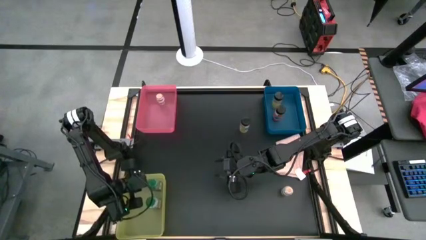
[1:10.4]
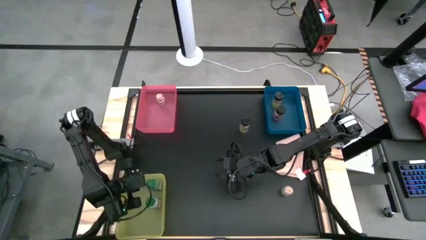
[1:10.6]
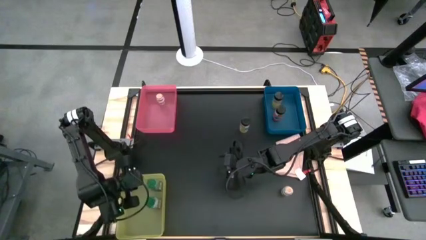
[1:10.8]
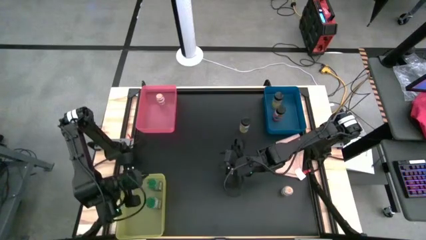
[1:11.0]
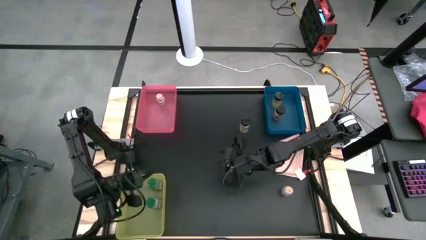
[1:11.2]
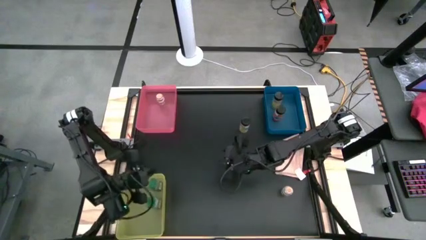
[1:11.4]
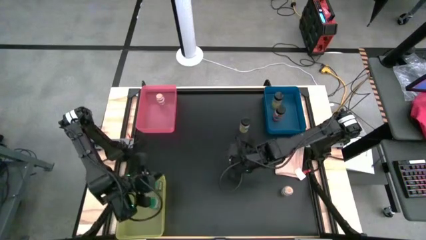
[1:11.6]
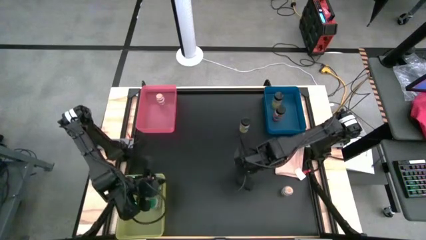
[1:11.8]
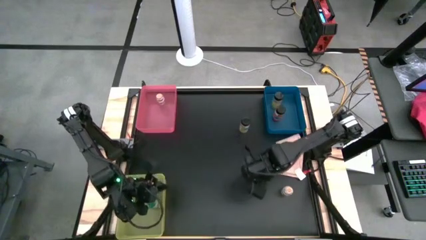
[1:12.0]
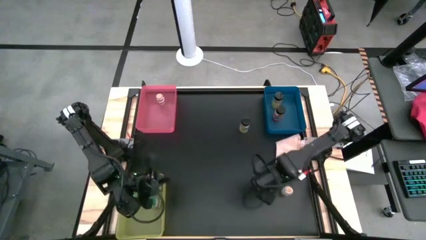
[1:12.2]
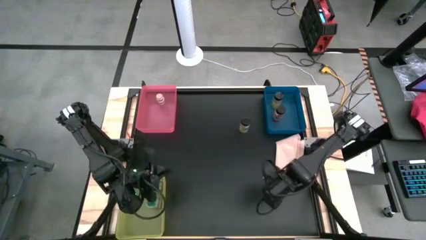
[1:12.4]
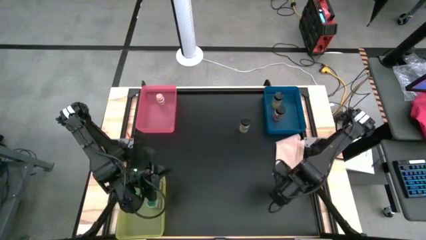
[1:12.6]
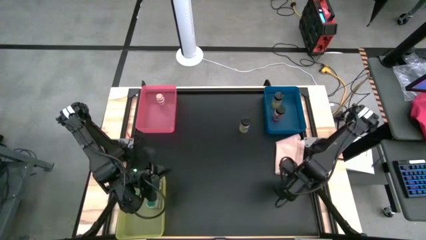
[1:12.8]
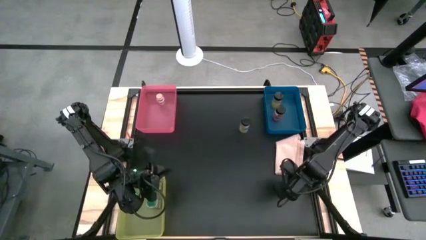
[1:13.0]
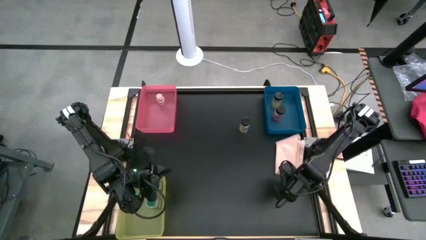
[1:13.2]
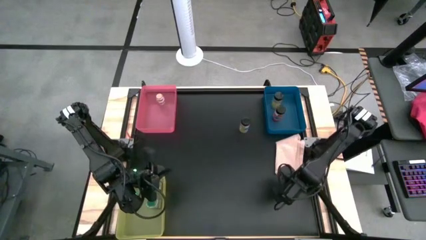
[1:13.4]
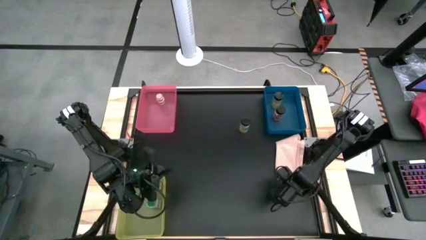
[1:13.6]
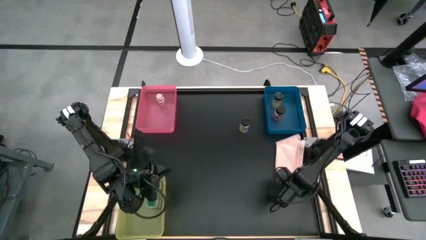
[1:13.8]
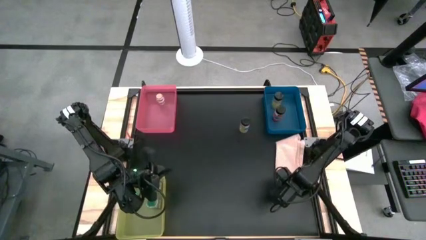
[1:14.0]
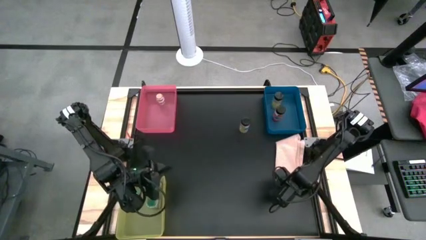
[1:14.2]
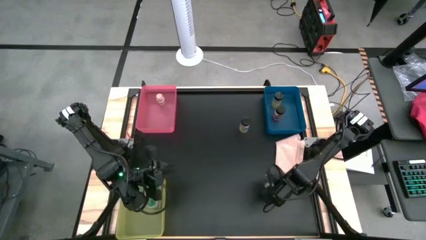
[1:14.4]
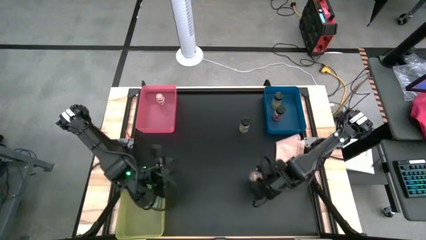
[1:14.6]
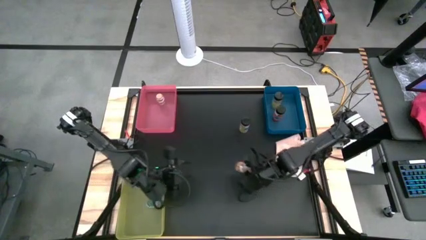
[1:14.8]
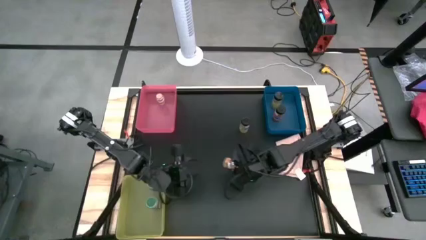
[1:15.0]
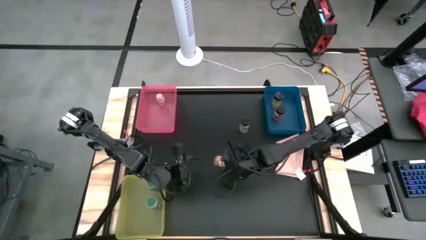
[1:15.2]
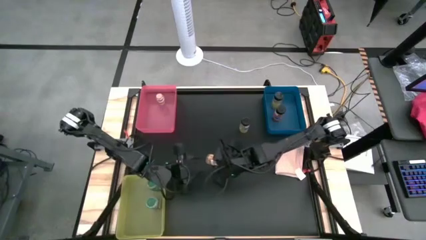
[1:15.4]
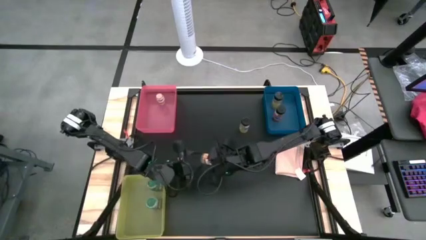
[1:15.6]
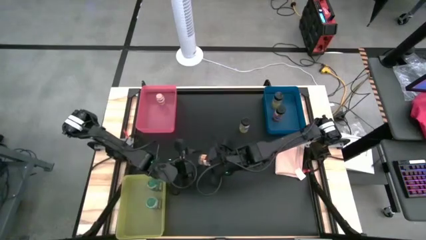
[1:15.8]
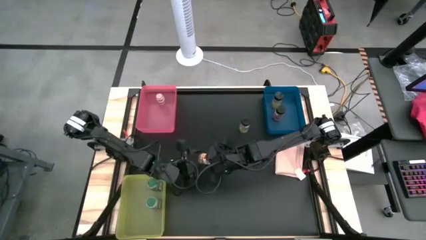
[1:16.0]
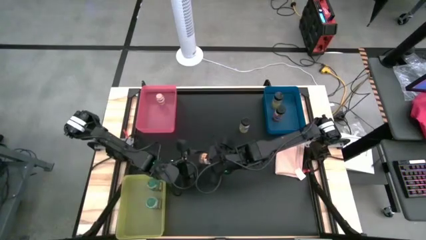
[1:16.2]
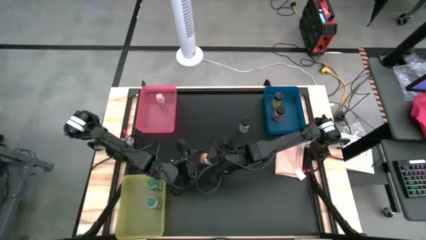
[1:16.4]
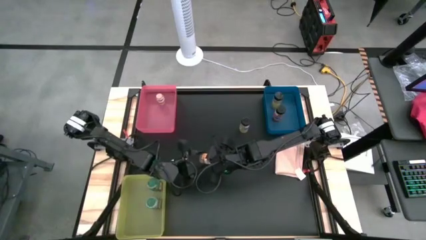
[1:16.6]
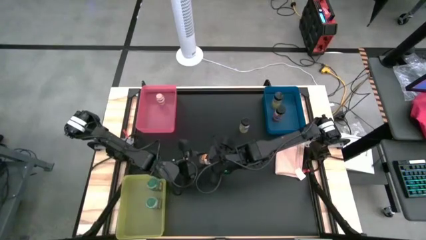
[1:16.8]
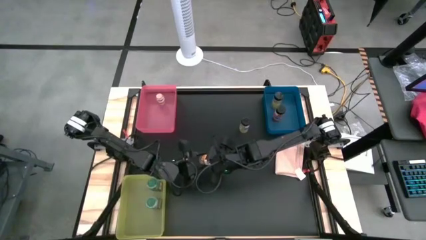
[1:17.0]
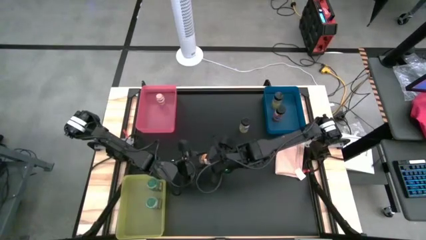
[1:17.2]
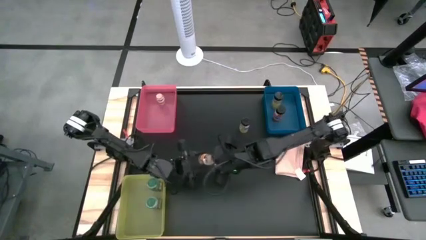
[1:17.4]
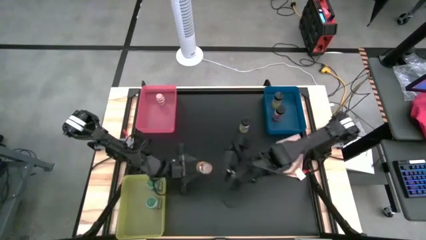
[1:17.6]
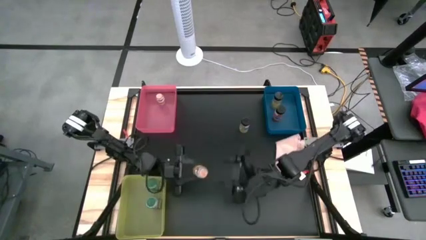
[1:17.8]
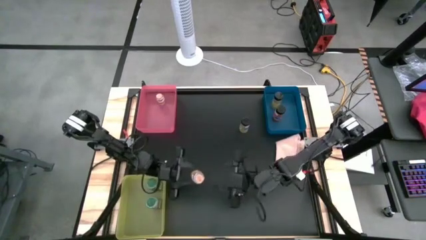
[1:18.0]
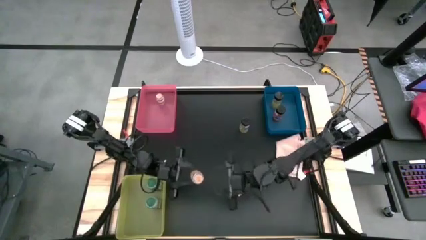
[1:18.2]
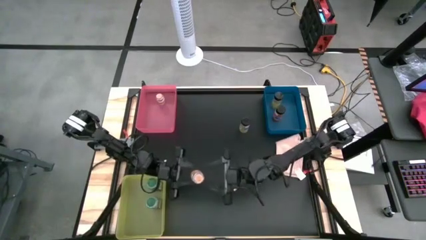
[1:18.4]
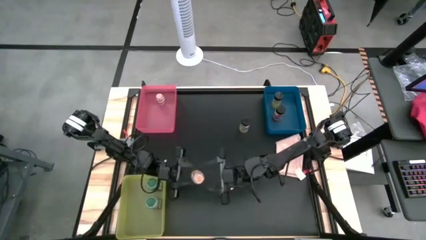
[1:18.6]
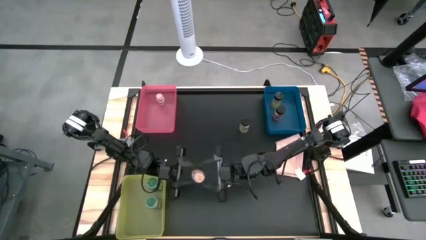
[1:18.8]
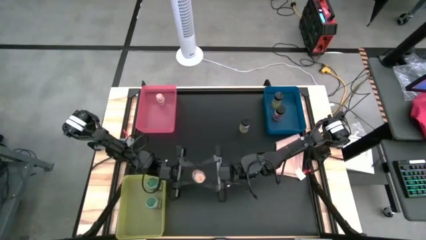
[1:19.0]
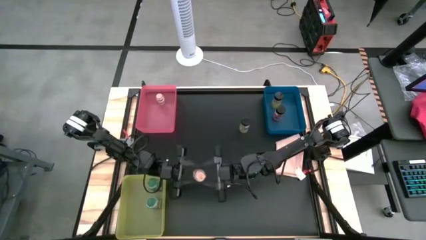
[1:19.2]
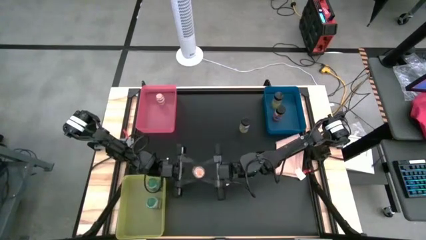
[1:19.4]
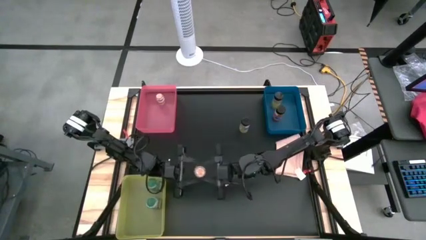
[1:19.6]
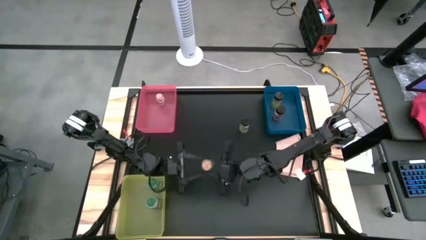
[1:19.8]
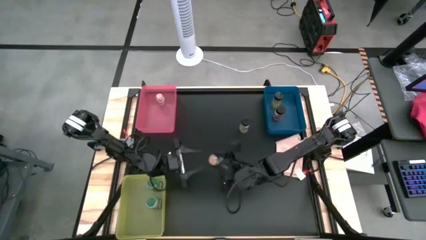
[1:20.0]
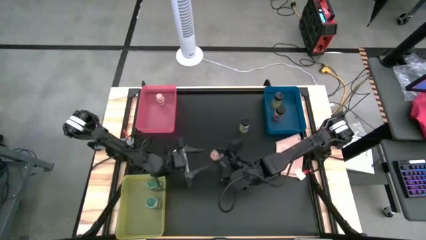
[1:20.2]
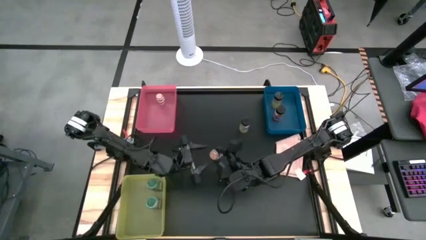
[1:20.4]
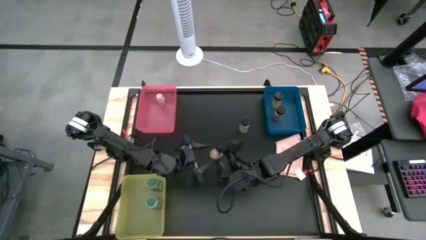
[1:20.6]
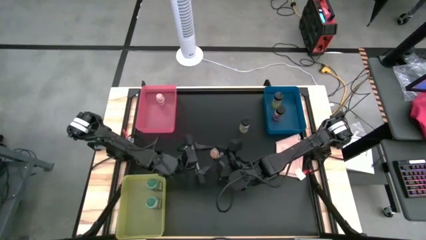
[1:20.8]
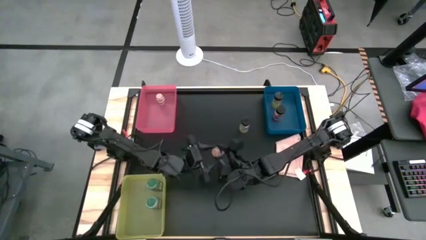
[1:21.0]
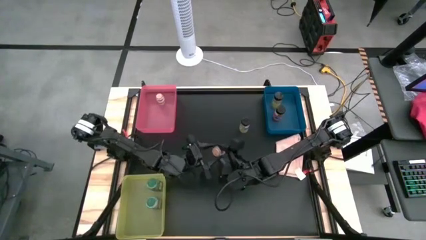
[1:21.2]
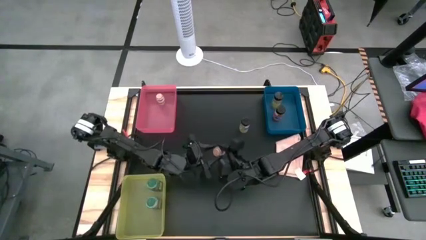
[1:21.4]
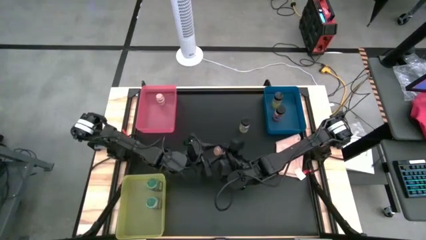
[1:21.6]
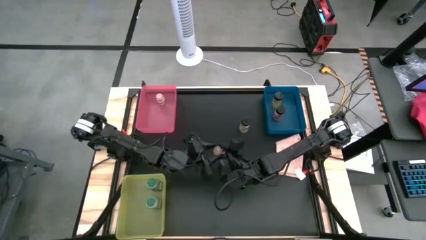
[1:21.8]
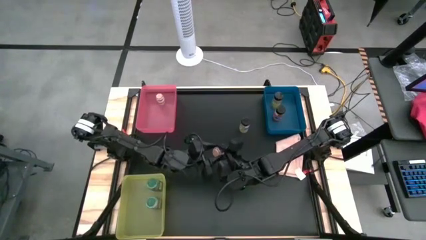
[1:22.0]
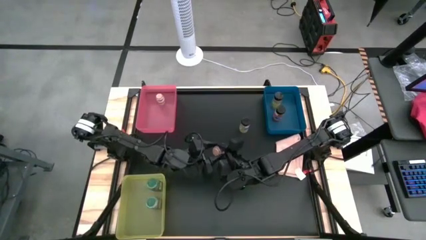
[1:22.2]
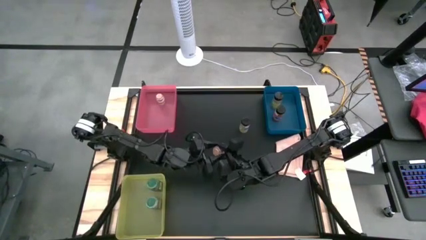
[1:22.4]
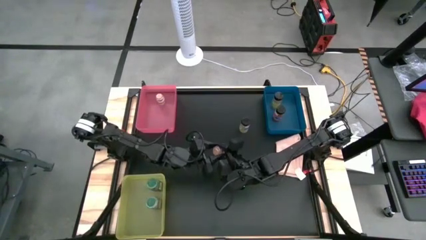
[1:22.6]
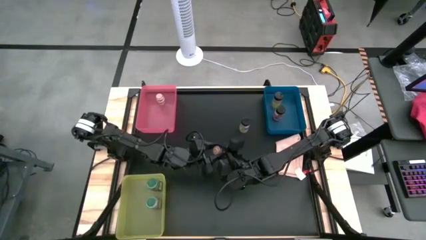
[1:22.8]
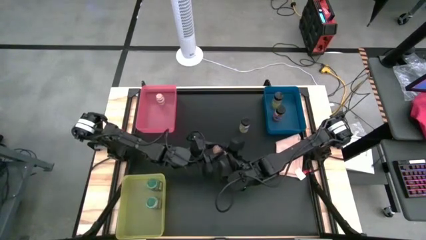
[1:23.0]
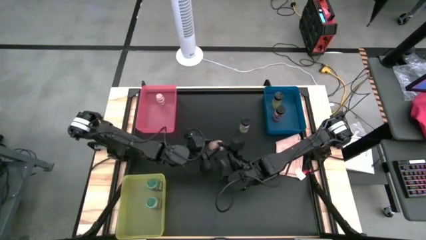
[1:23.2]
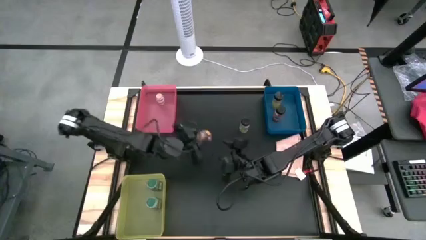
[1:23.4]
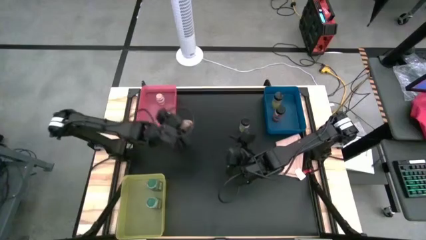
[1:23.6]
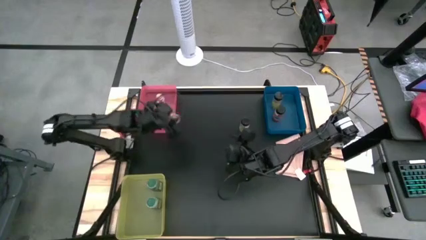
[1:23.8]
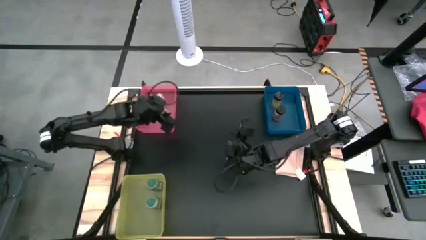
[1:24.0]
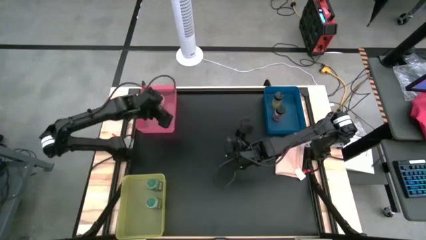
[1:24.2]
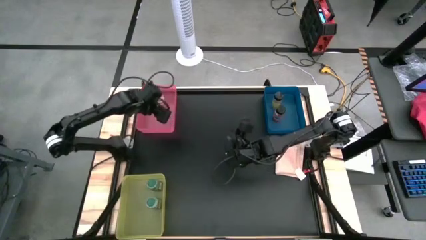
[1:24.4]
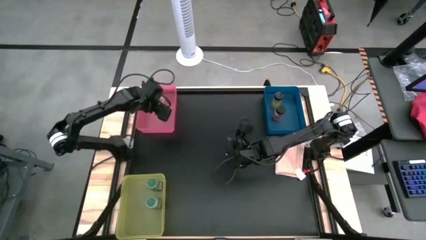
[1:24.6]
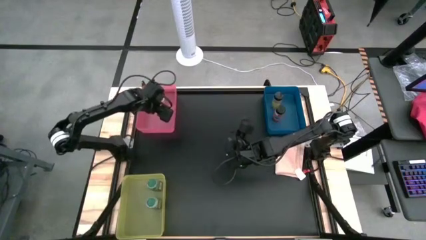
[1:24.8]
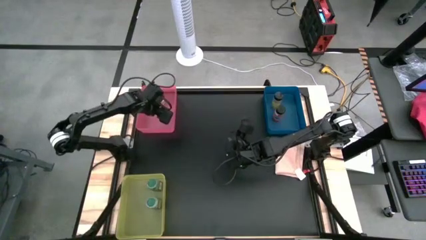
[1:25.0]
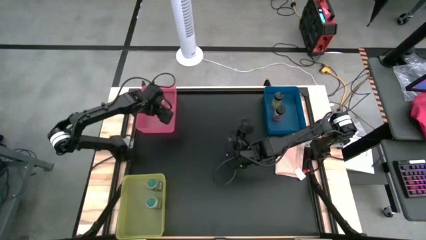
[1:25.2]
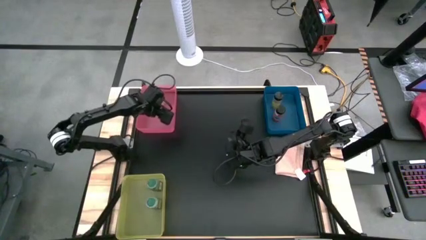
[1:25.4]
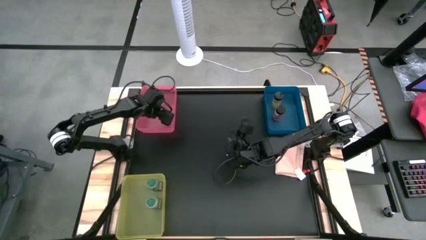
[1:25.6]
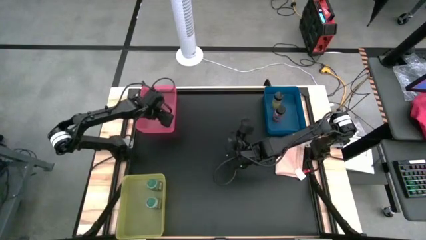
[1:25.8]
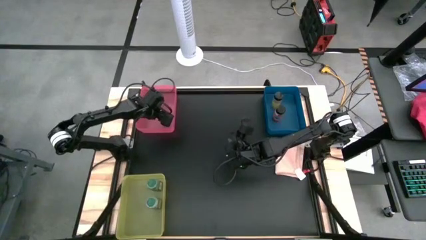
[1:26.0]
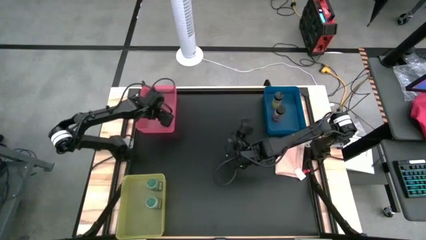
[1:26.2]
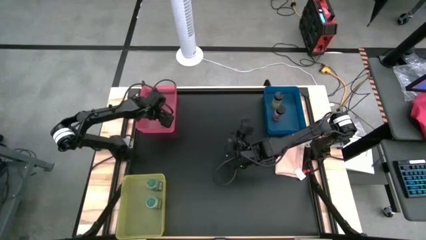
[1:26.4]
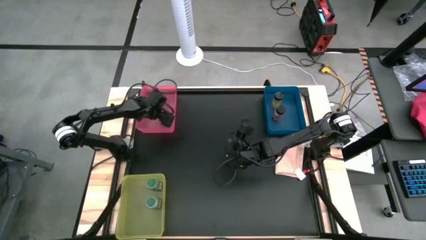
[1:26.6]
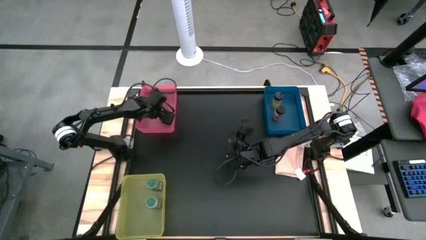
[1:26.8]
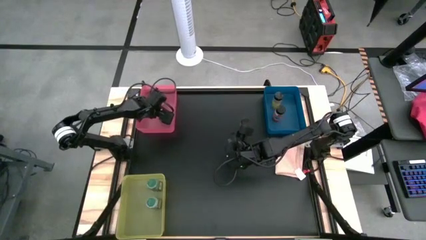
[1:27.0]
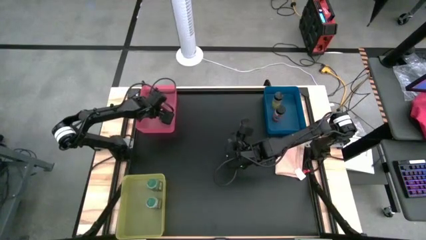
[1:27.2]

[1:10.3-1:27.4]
Task: Sort spices by type
Put the brown seasoning into the pink bin

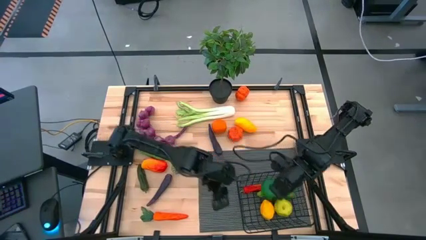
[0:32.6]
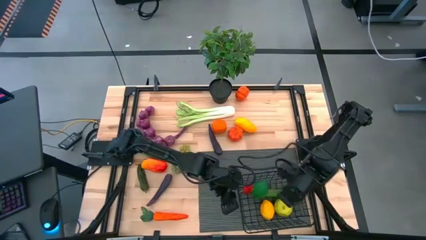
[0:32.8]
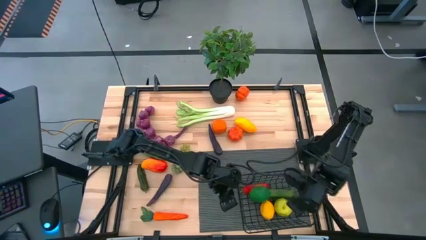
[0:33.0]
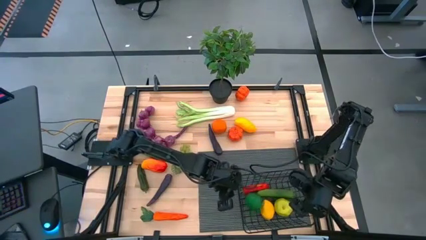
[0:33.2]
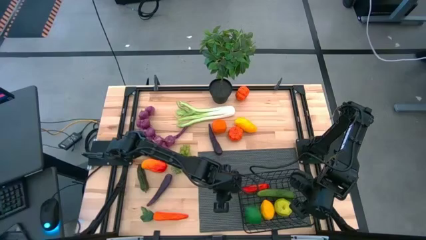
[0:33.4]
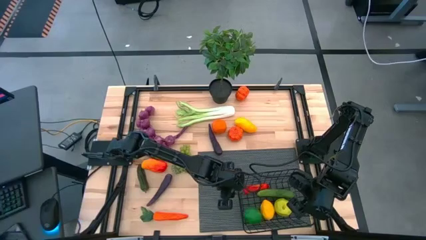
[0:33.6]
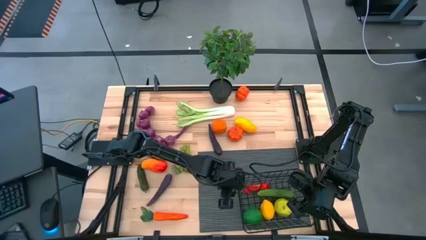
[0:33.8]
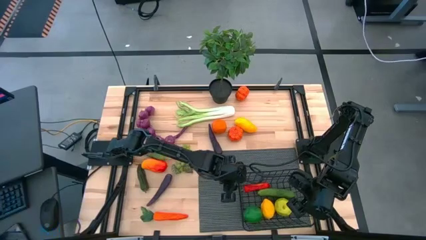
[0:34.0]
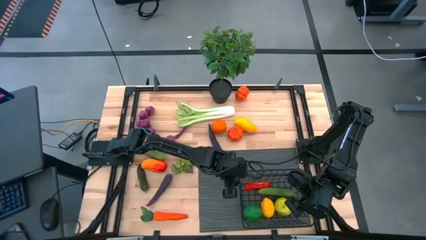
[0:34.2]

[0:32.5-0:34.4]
Task: Build produce basket
Adjust the black wire basket on the gray table mat
